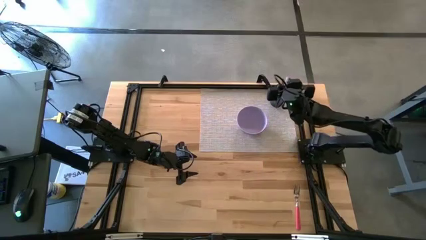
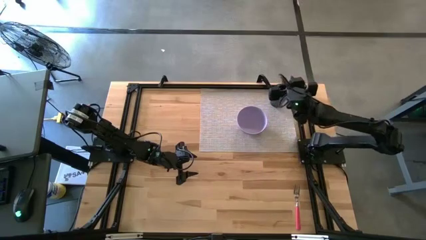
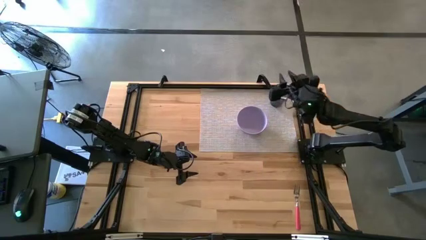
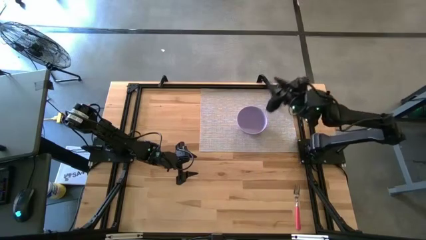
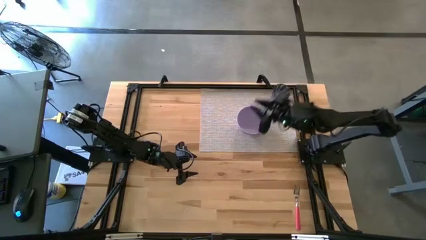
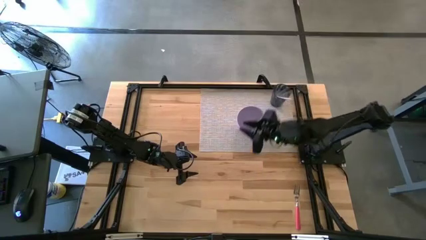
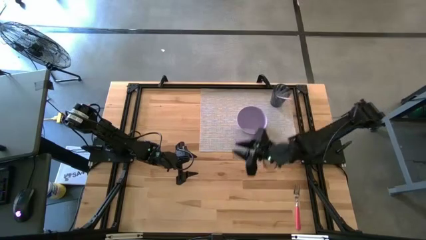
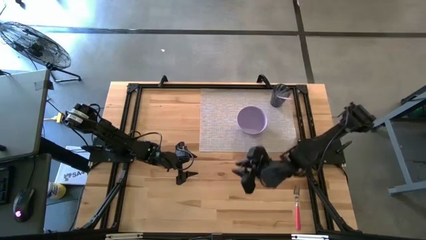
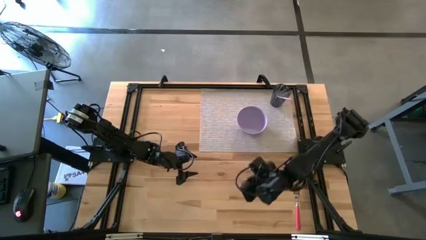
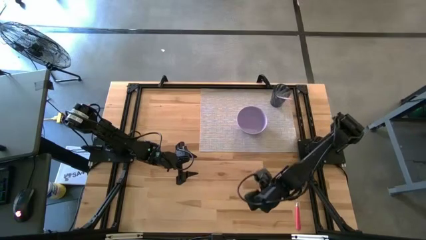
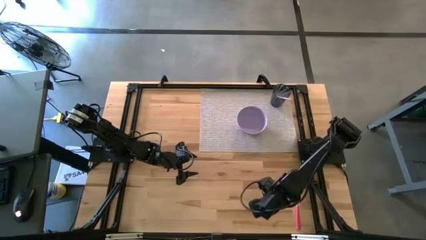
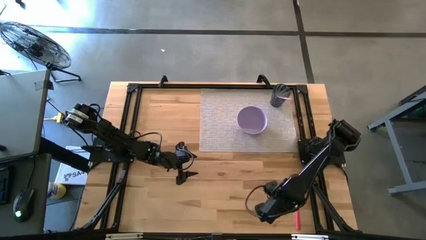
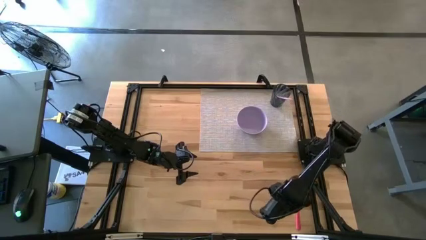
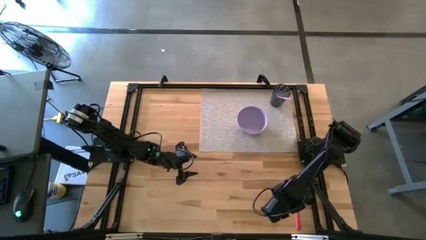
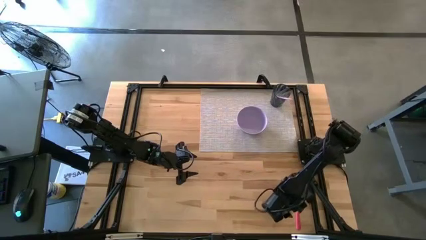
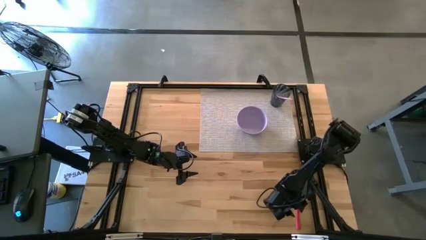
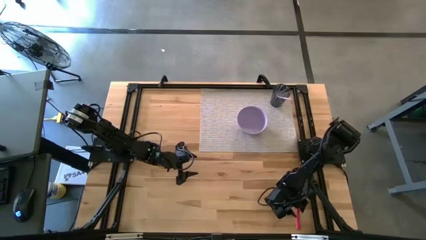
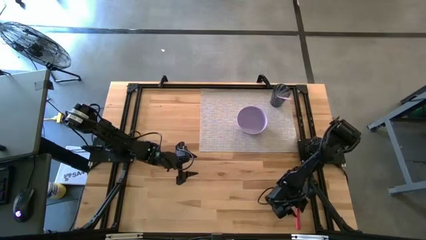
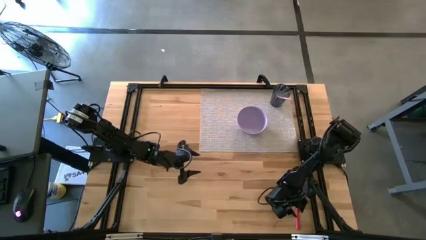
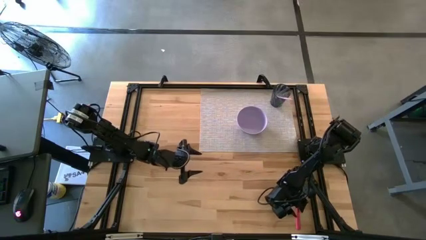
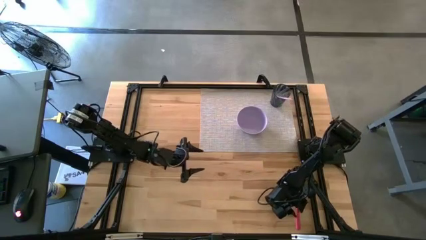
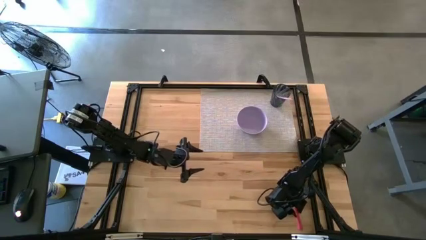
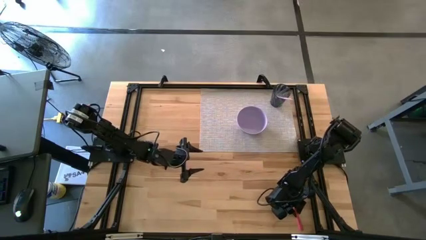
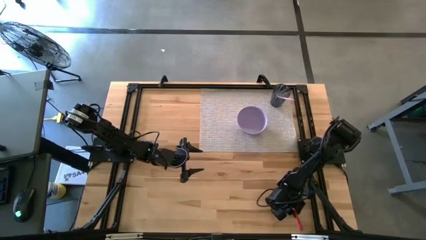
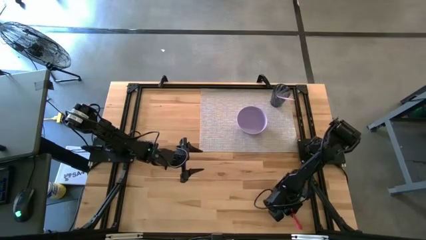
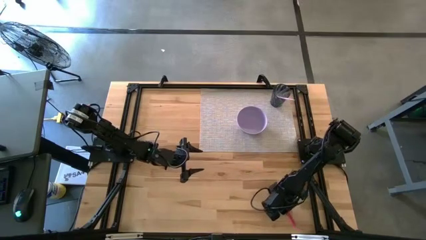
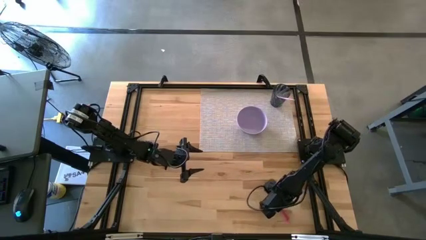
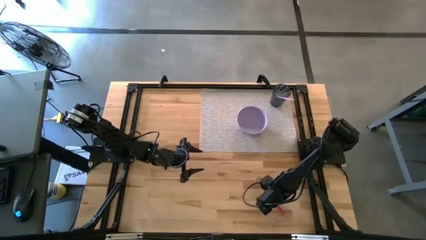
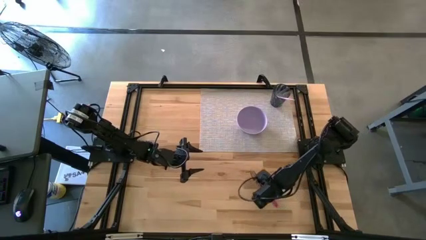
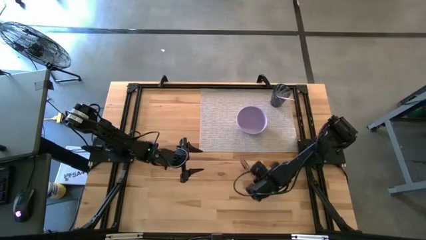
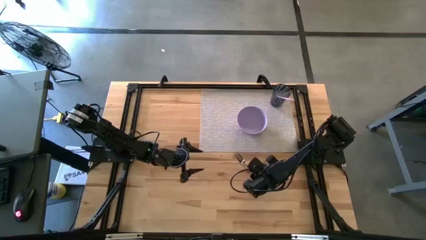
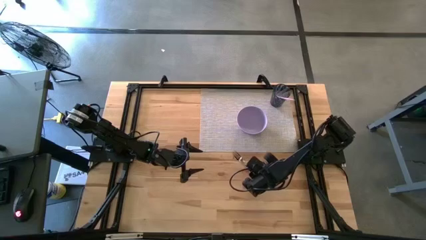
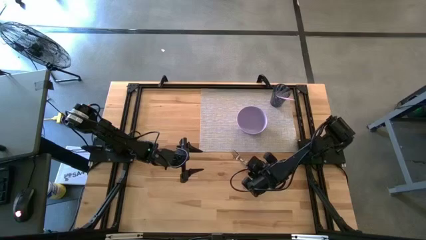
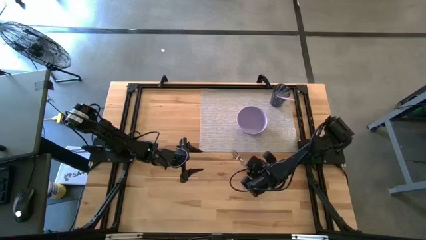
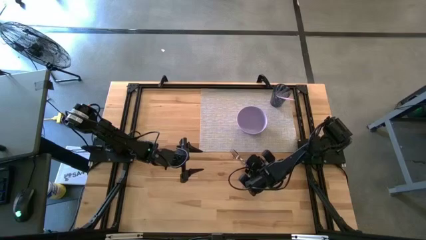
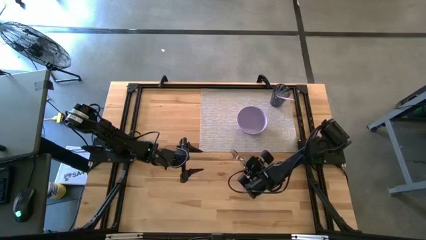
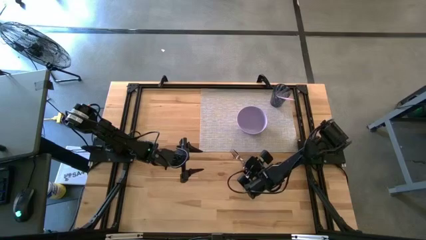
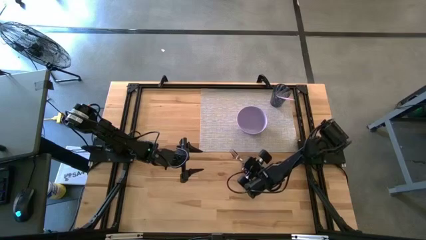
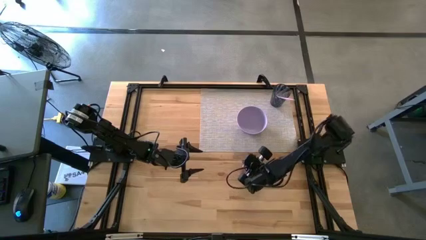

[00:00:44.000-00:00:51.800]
Task: Pick & Place Utensil
Put the pink fork into the purple bowl

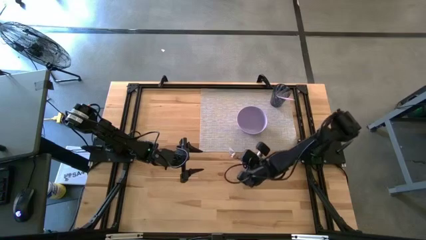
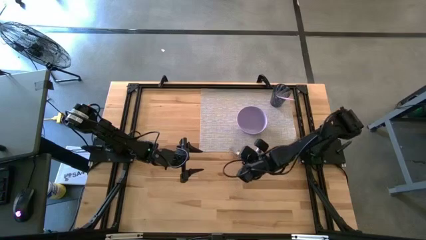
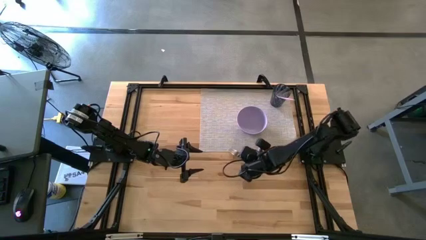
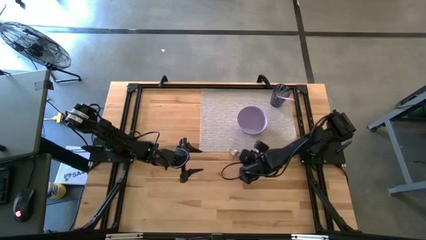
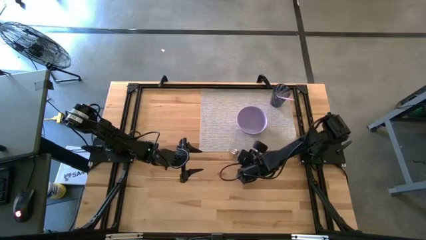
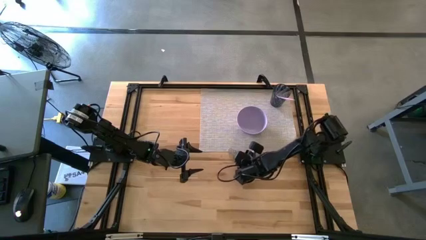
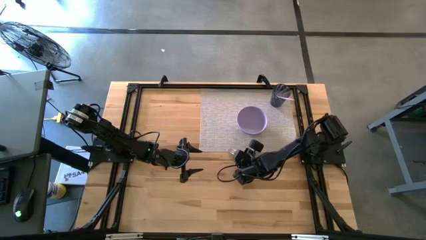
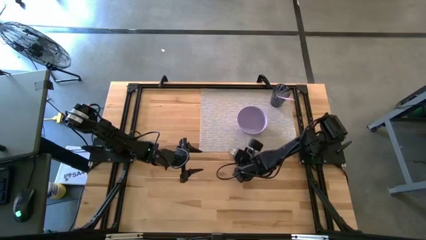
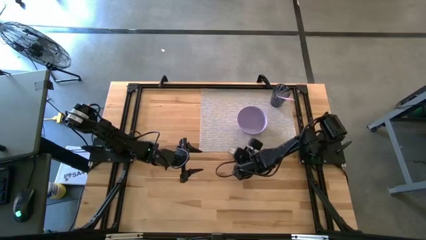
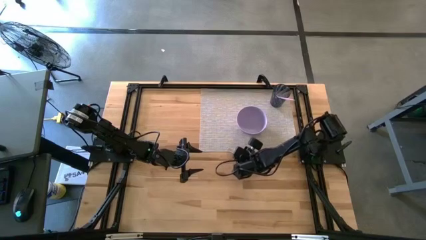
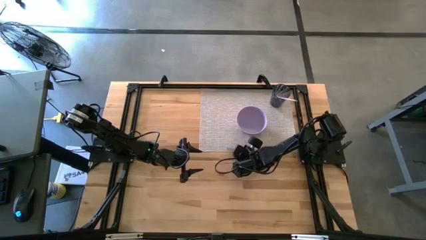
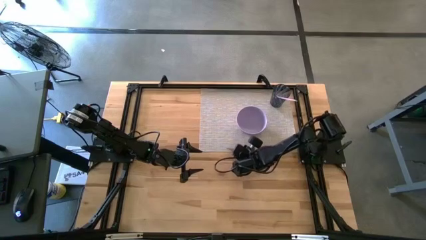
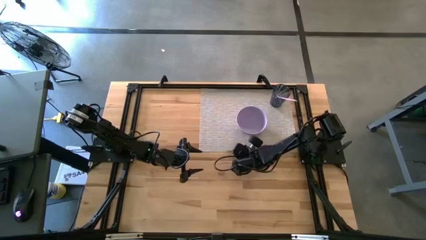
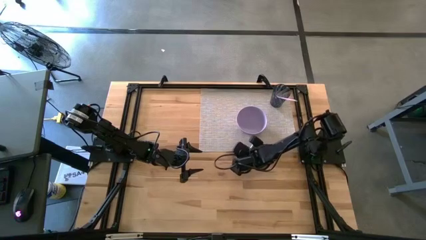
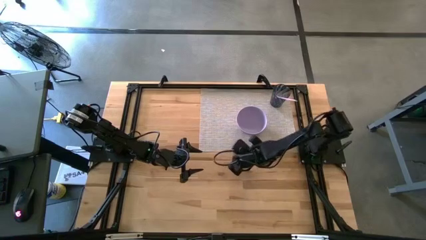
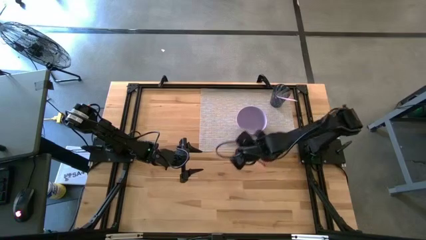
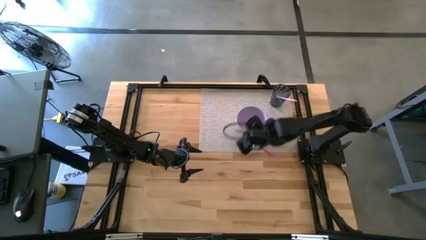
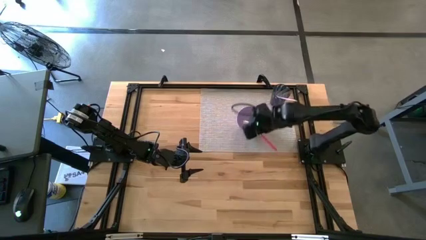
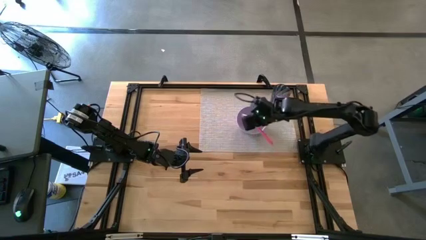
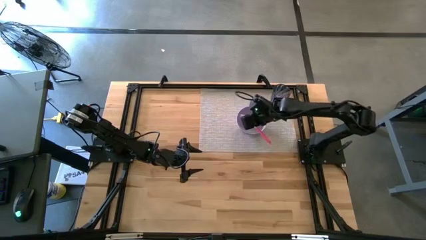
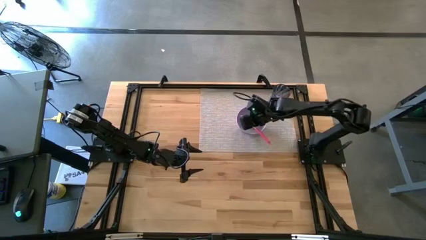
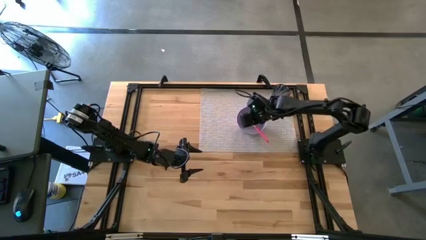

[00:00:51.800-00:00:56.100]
Put the pink fork into the purple bowl
